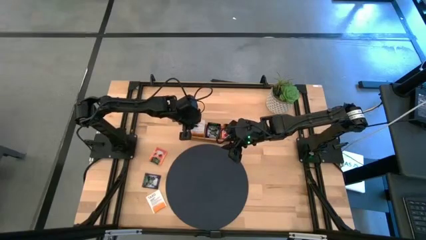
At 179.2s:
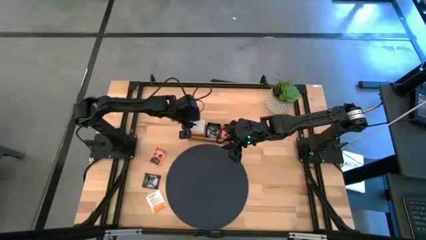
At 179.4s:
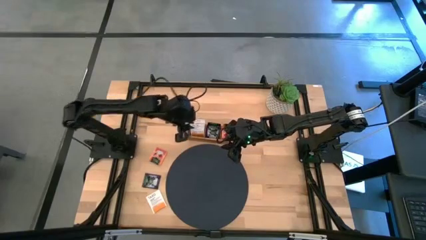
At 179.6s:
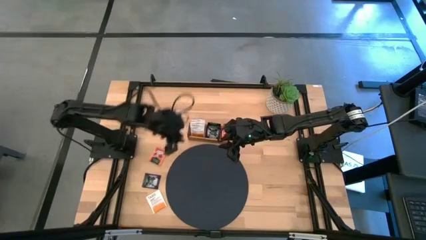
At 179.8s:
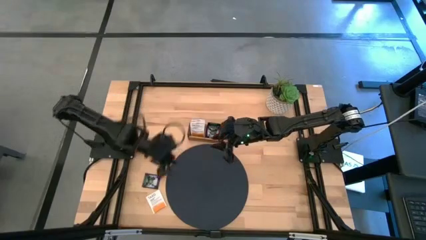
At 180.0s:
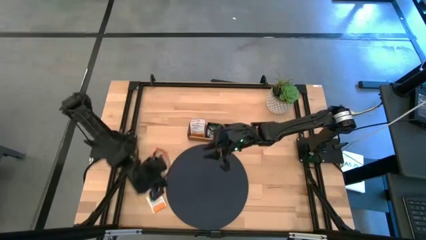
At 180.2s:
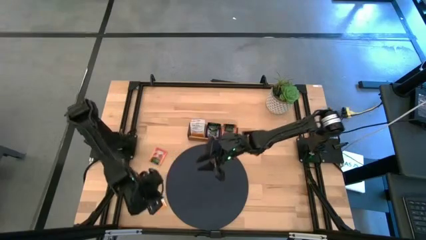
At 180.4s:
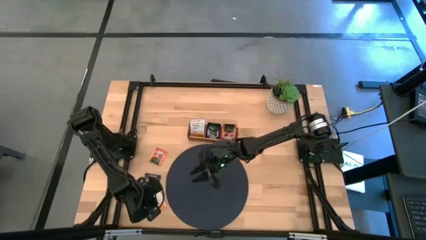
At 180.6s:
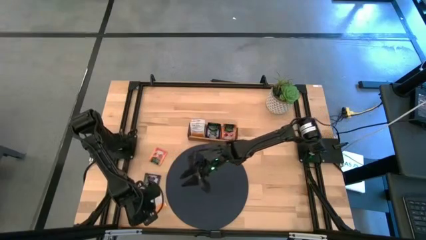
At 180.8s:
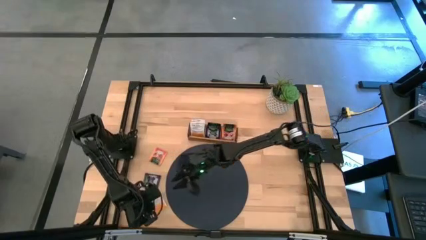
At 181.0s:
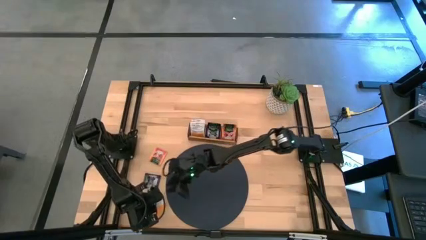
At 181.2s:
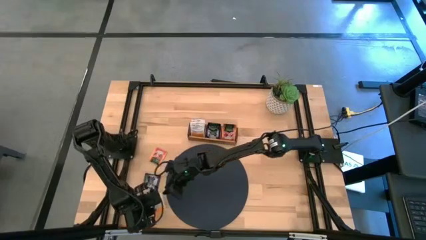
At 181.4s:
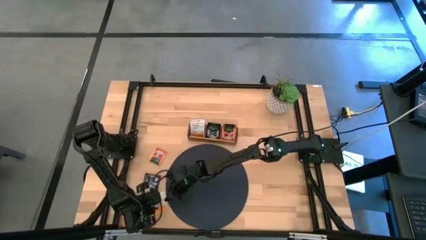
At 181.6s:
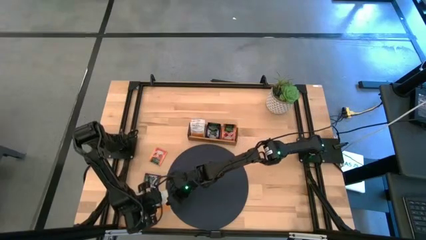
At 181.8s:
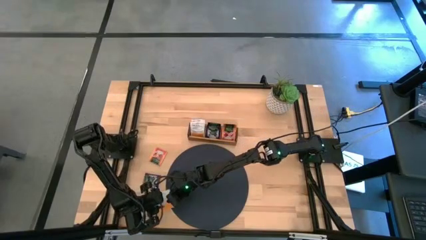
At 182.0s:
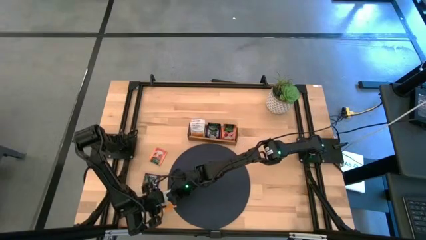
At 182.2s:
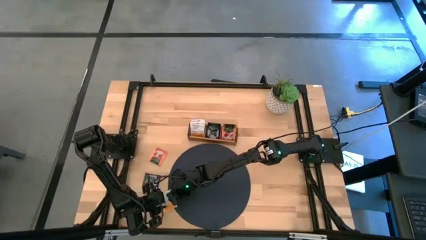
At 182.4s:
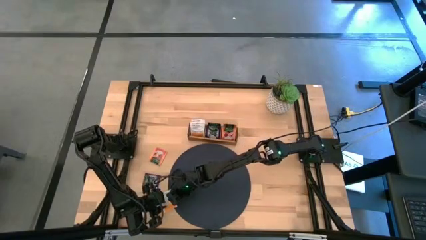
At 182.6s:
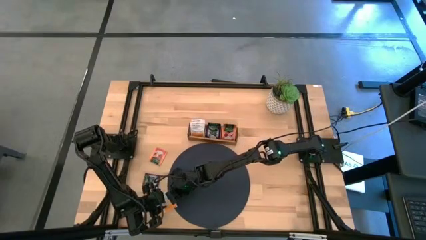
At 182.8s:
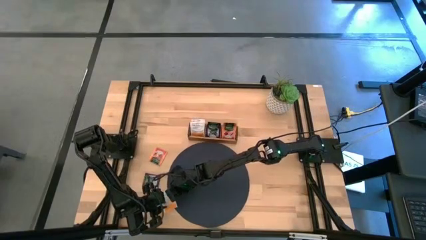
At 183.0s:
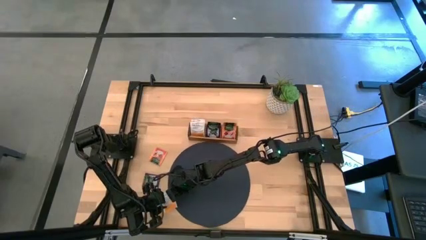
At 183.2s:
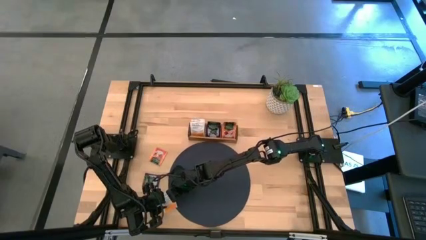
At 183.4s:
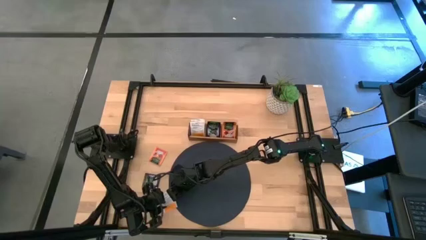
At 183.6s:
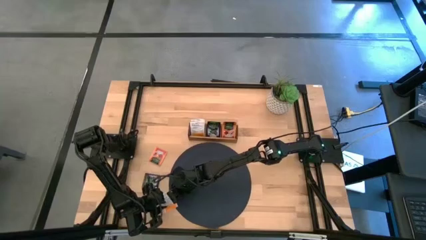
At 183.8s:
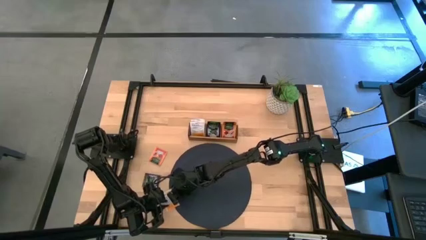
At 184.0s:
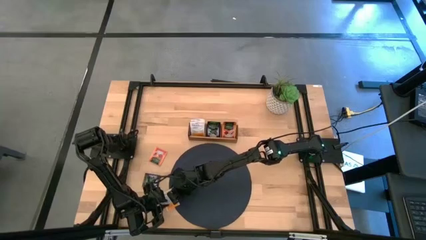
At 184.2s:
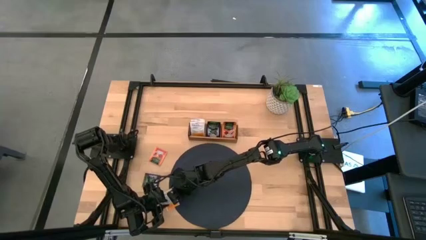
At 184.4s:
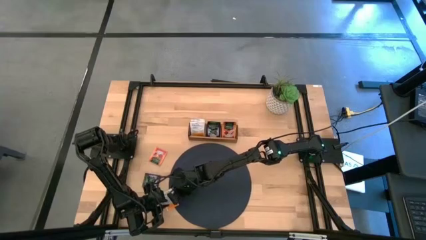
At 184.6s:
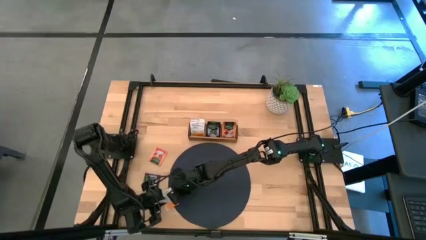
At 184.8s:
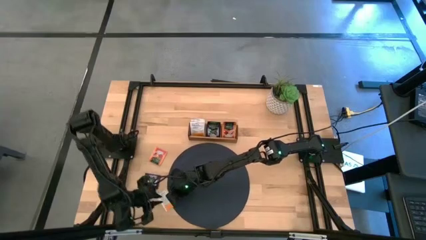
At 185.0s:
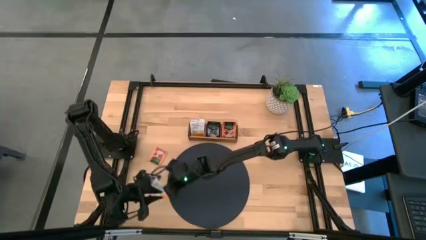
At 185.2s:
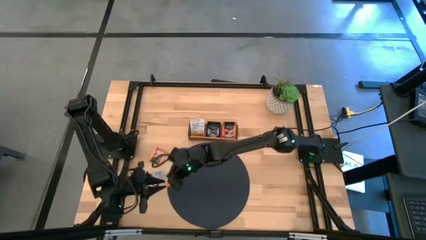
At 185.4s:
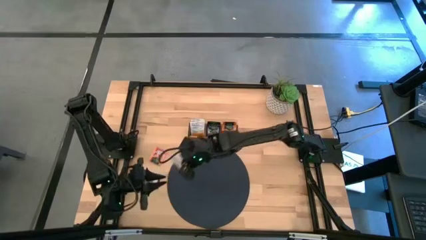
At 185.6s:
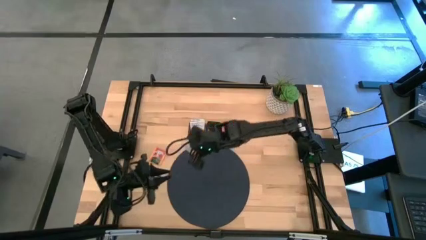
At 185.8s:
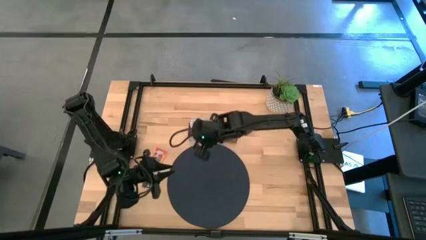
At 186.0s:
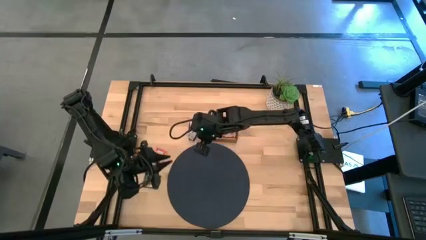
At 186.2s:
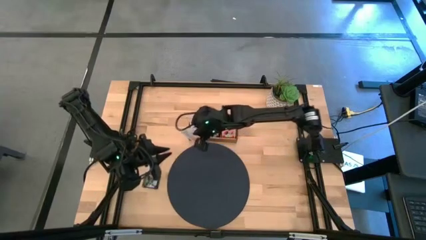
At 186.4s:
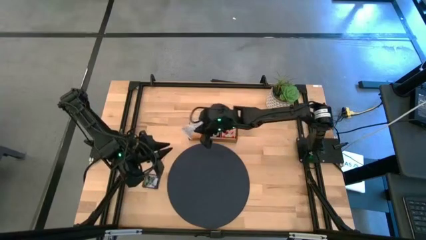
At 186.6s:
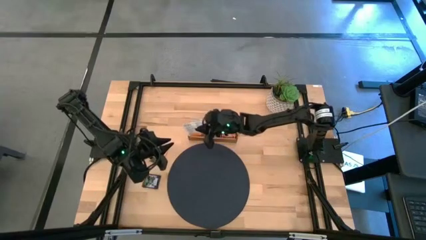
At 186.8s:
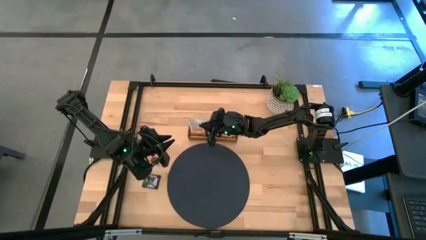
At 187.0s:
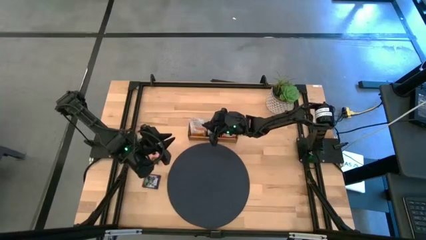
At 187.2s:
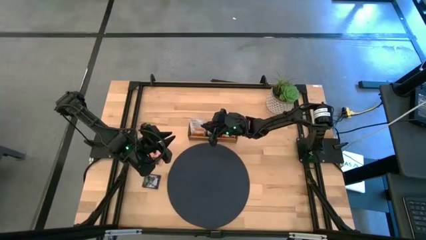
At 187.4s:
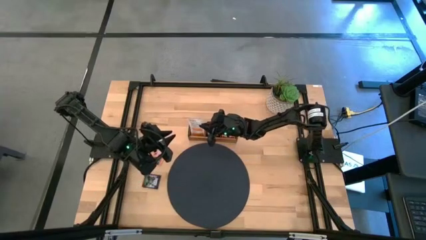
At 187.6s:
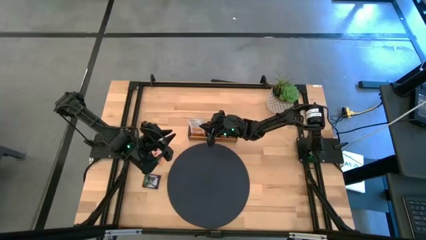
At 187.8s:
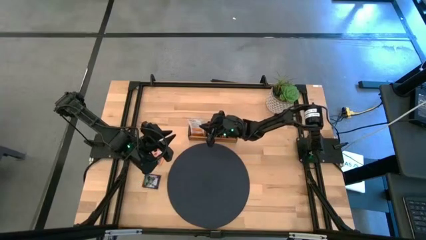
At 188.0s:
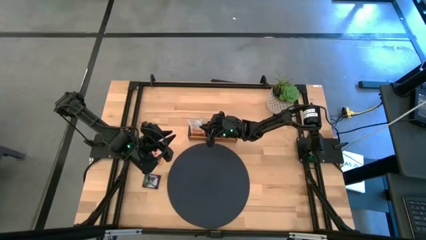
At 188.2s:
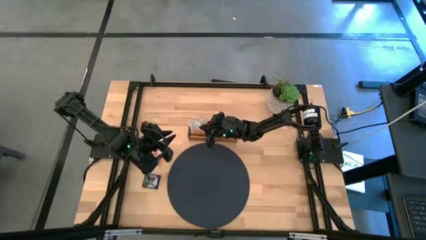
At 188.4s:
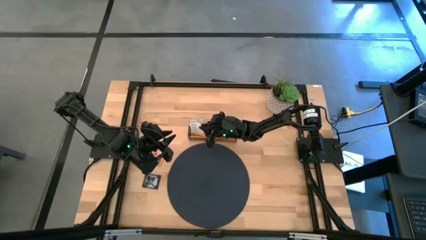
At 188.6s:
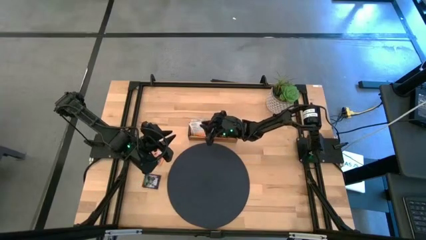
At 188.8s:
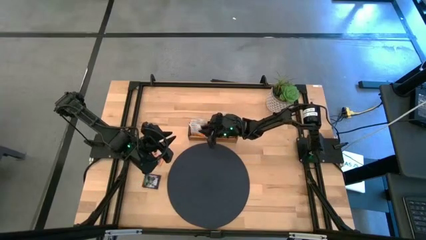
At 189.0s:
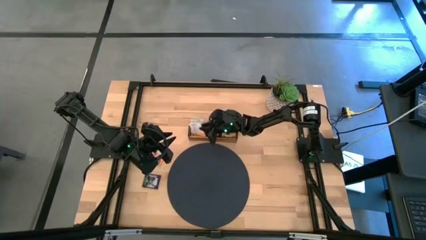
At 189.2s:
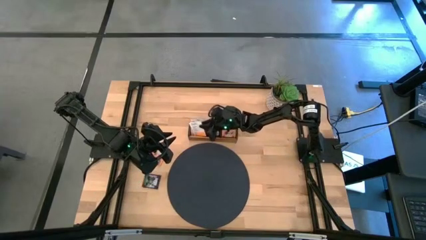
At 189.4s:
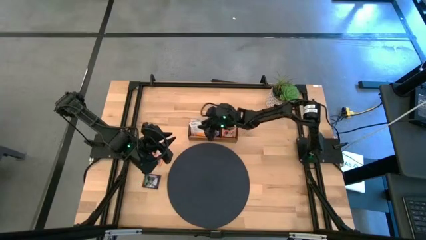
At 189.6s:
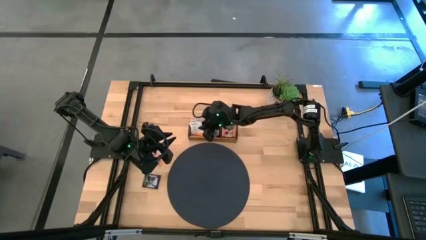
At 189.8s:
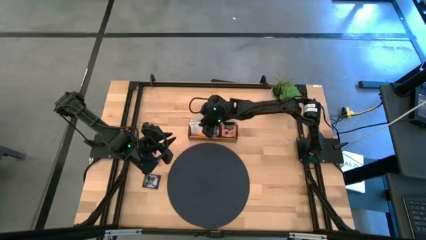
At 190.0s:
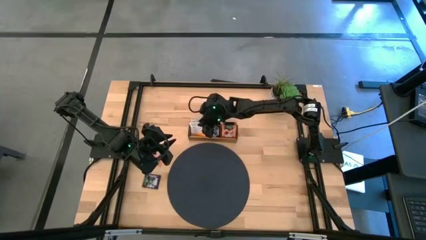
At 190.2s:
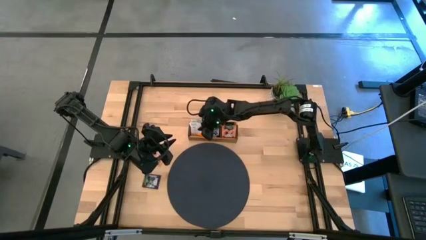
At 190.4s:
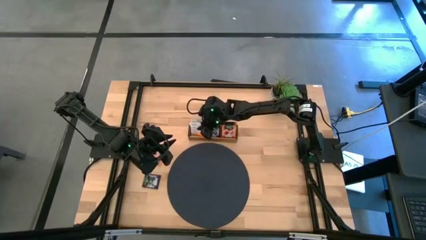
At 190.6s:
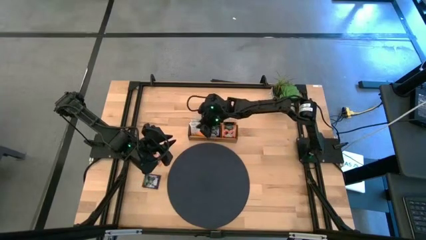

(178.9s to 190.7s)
Task: Pick & Place Tea
Put the white tea bag into the left of the wooden organizer

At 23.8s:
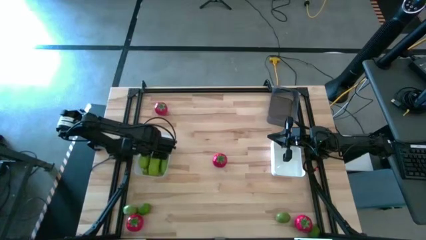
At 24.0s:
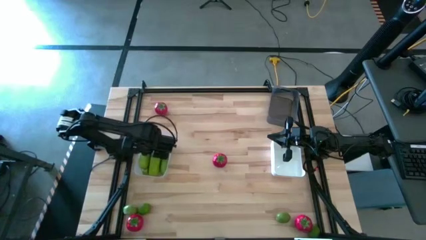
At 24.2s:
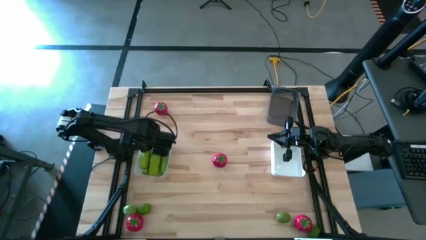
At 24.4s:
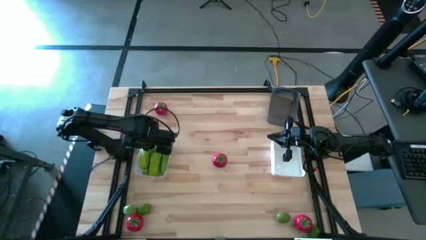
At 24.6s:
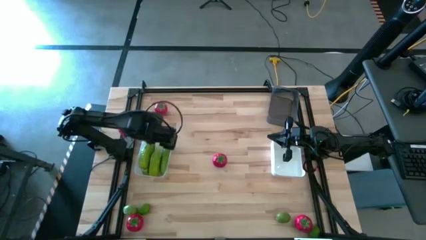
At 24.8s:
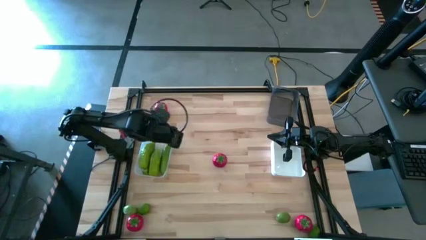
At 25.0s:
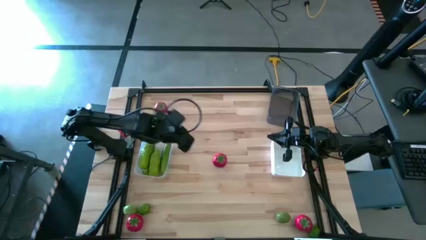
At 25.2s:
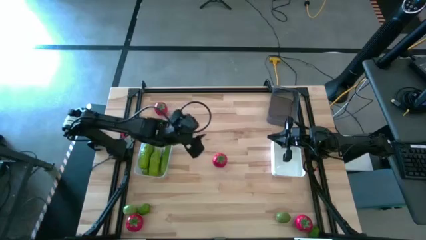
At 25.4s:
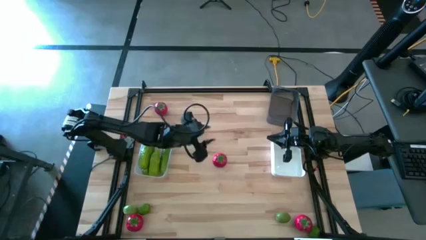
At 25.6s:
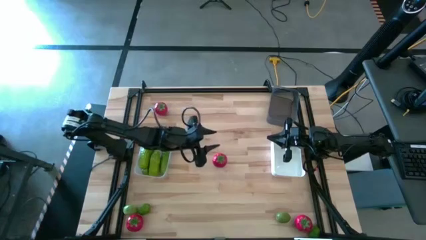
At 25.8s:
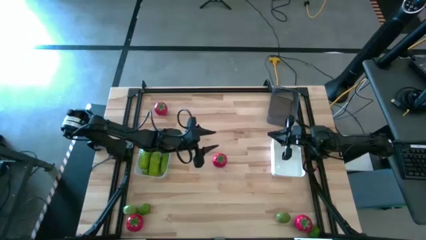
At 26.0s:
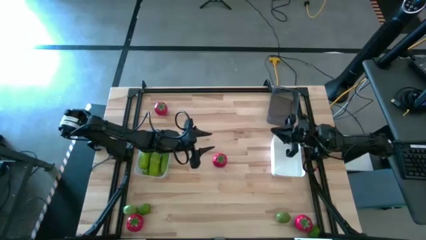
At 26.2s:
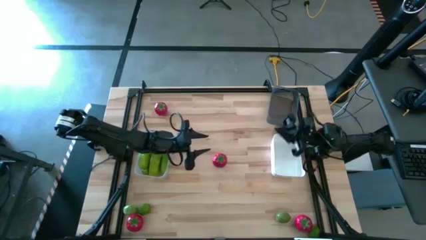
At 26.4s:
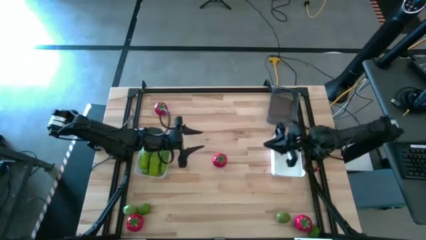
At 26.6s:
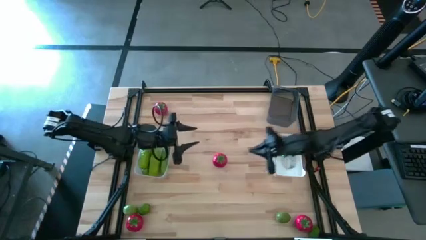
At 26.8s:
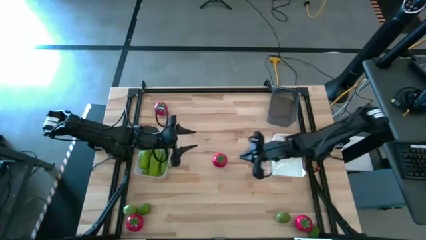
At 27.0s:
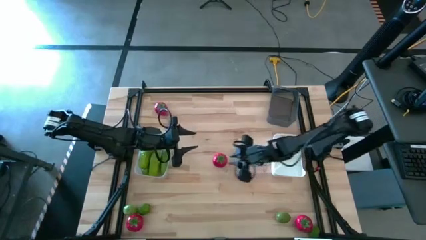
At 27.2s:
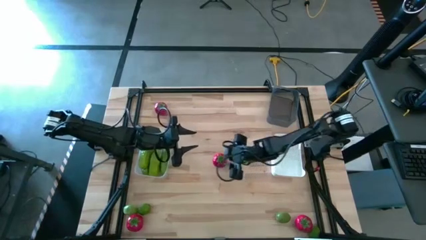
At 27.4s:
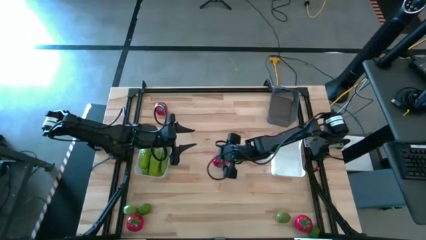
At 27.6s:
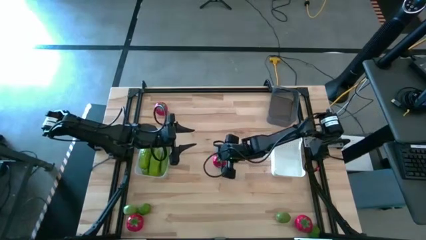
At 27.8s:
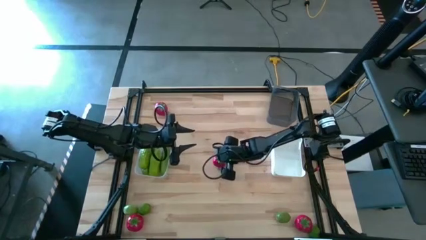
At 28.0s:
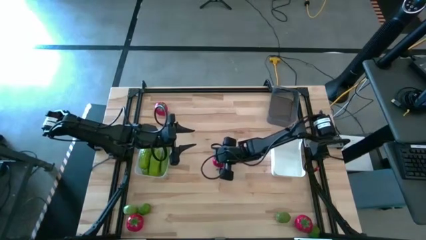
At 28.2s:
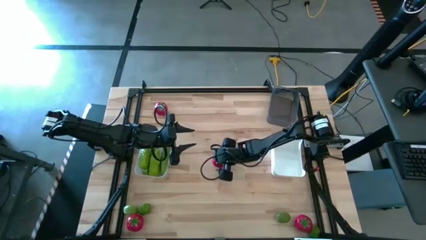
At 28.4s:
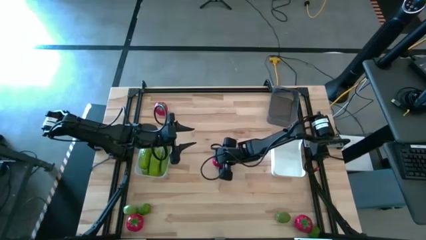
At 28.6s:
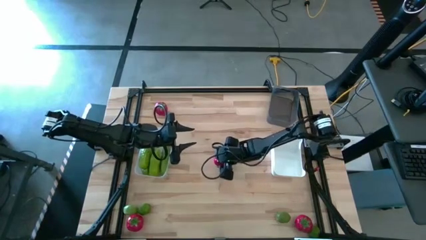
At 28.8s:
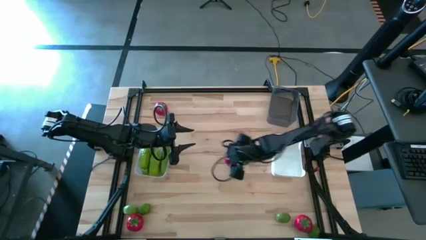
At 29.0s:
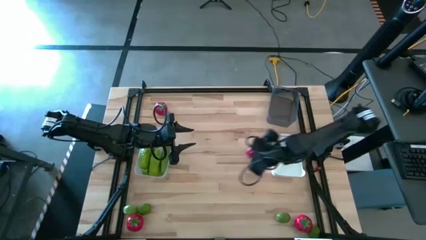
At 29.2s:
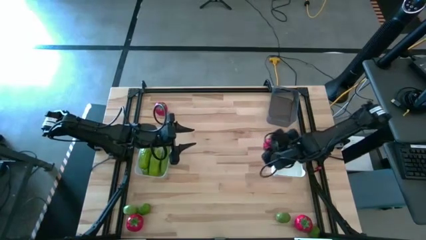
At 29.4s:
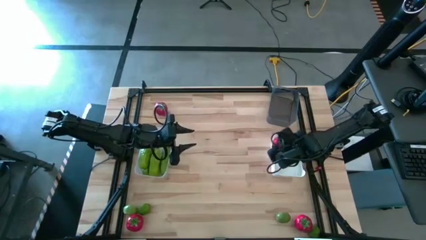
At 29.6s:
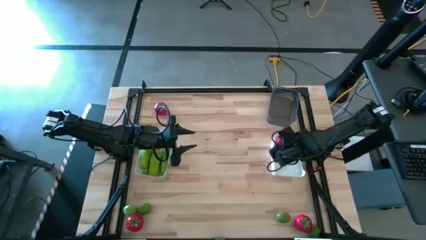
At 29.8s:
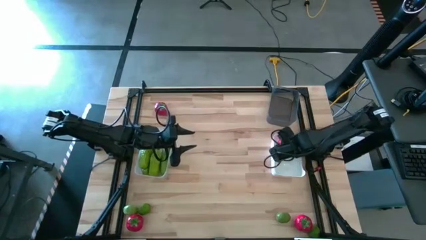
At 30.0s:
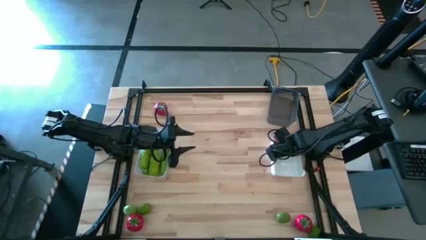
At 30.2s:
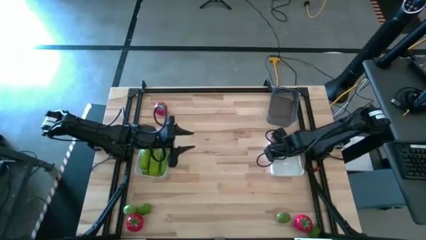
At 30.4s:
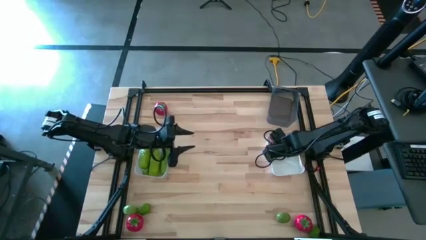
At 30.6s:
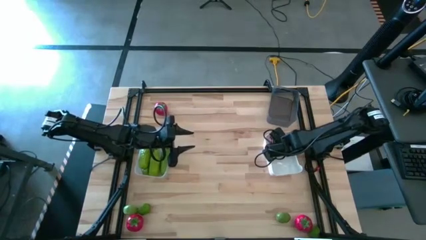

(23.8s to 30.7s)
Task: Sort produce into baskets
Put the tomato into the white bin
